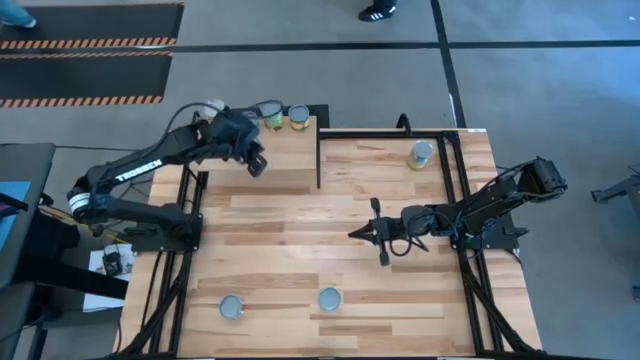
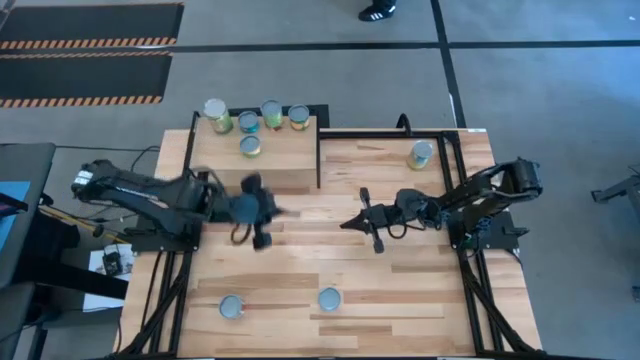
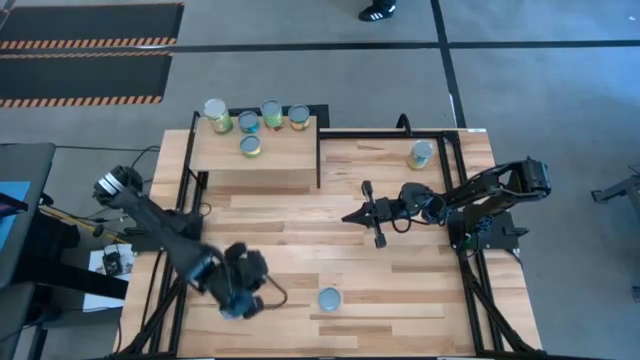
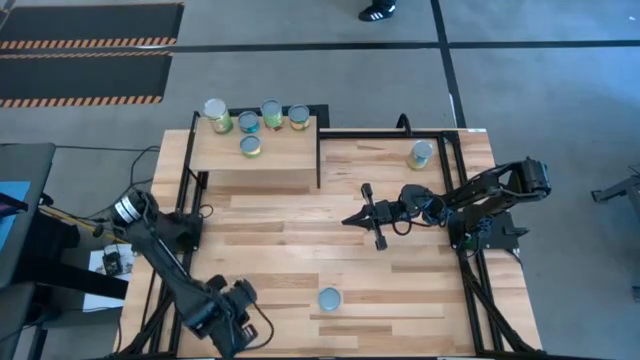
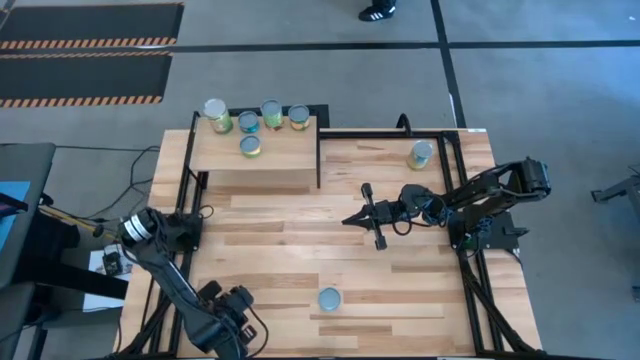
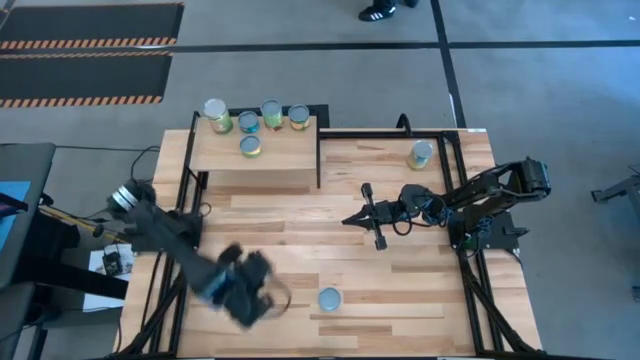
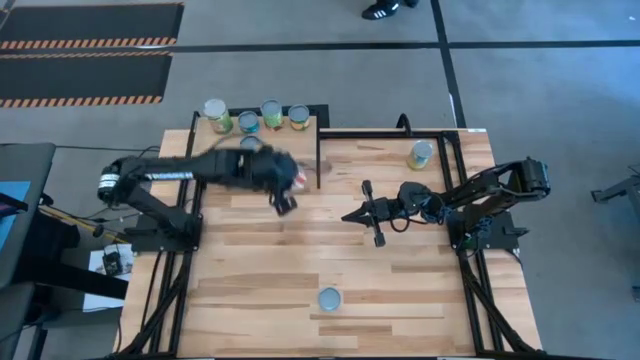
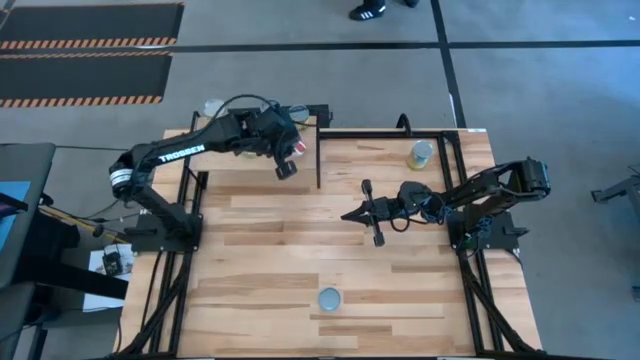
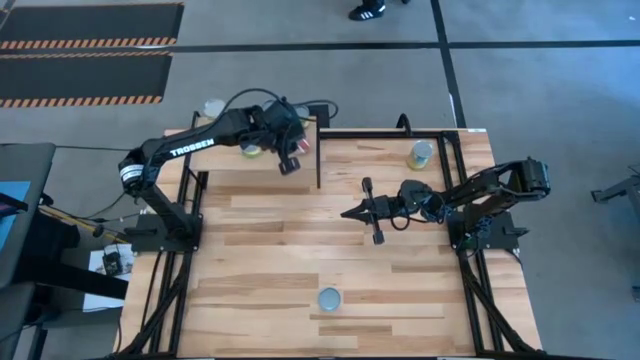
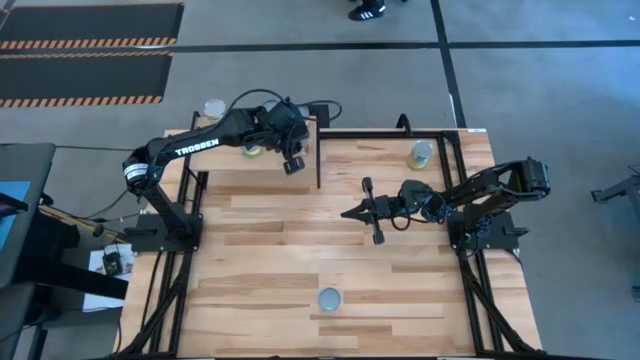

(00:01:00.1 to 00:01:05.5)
Task: Pick and place cans onto a shelf
Put the canned tomatoes on the shelf

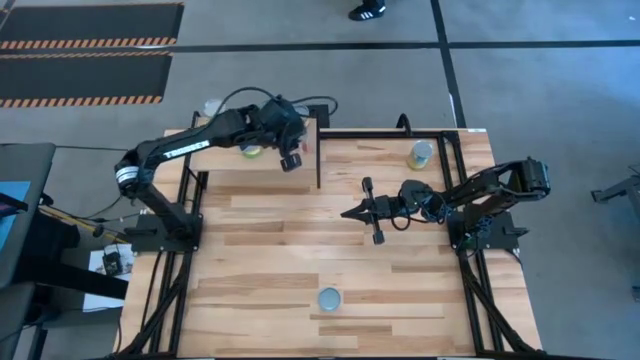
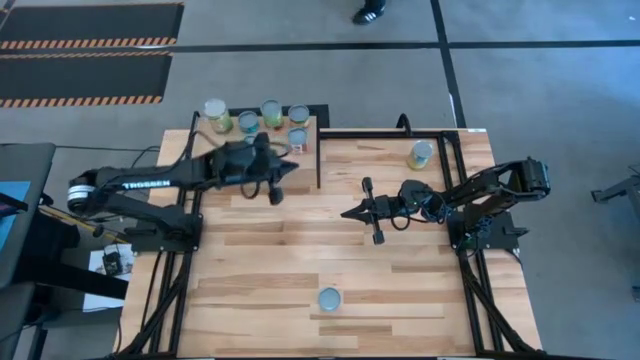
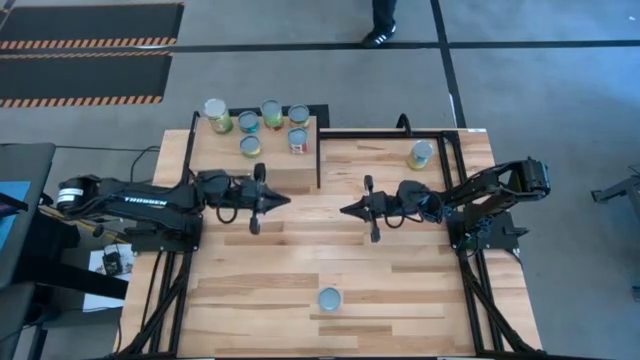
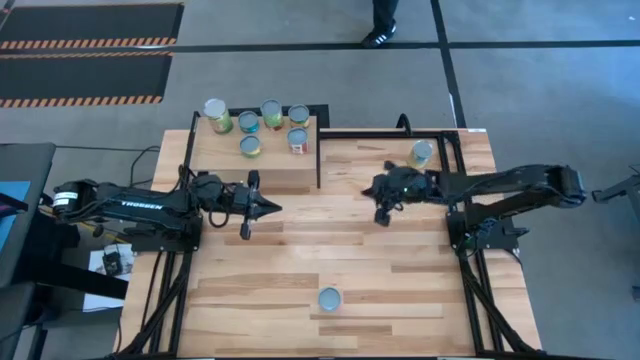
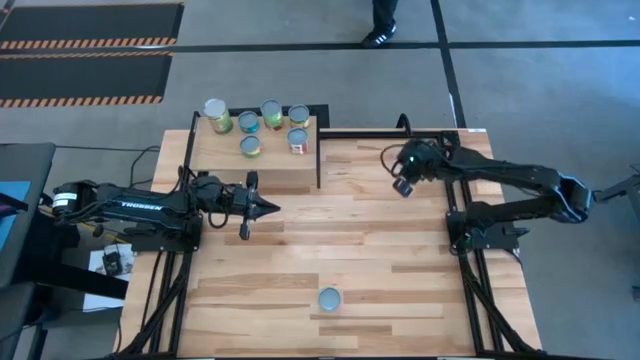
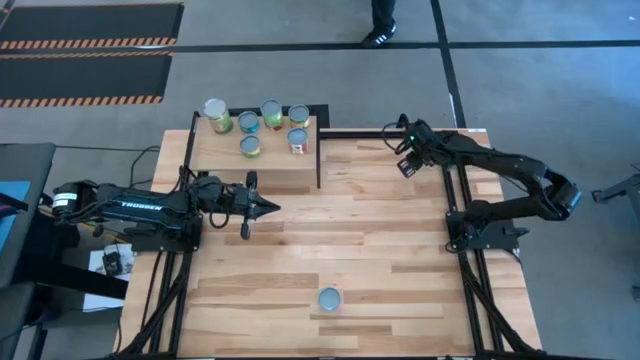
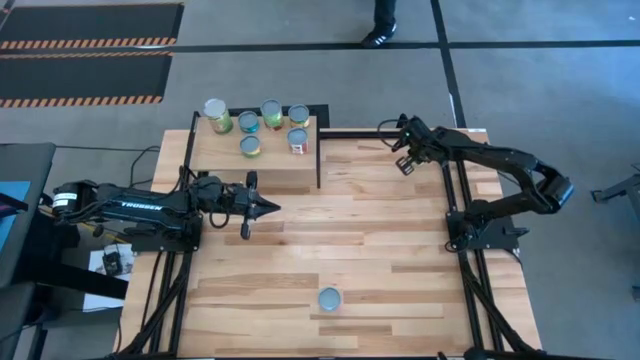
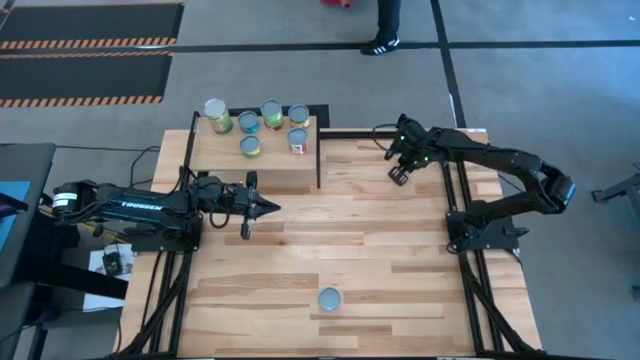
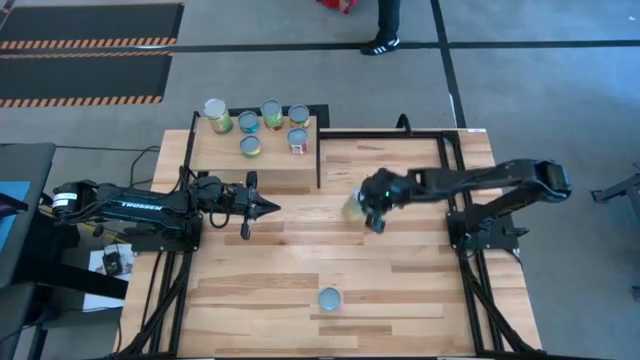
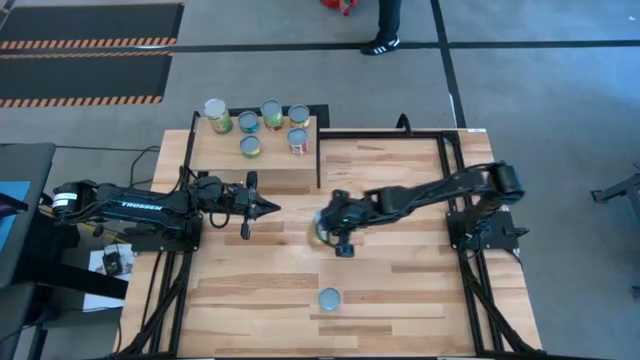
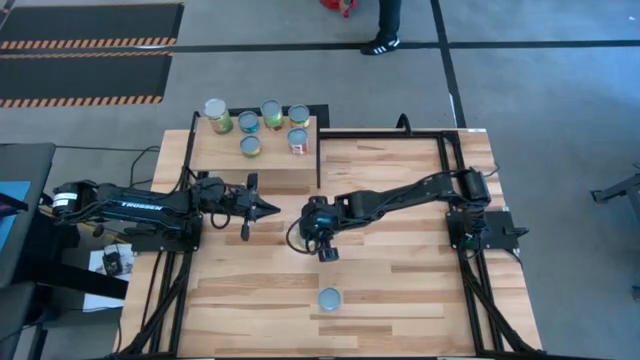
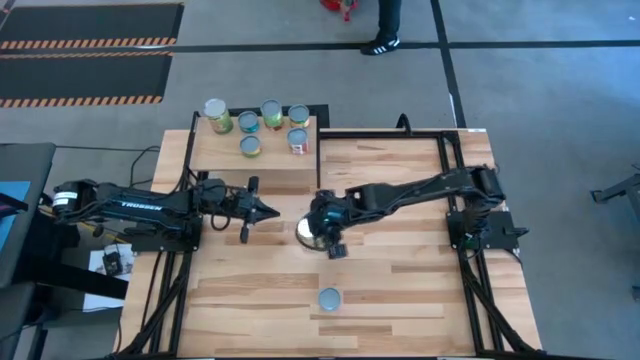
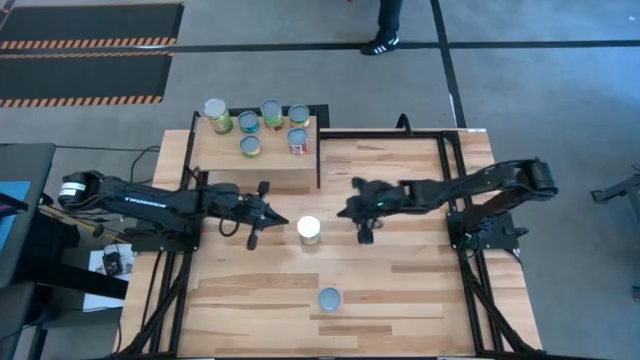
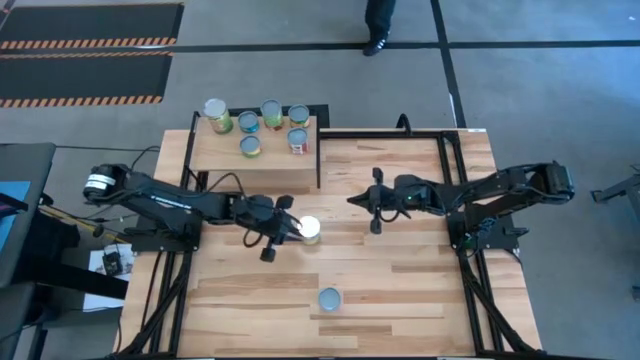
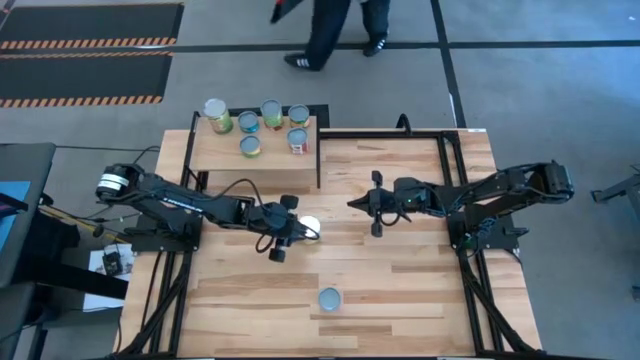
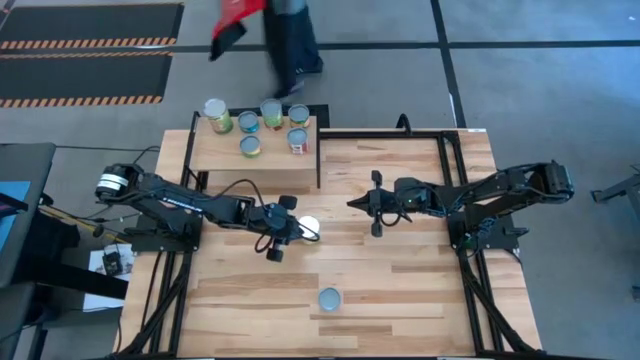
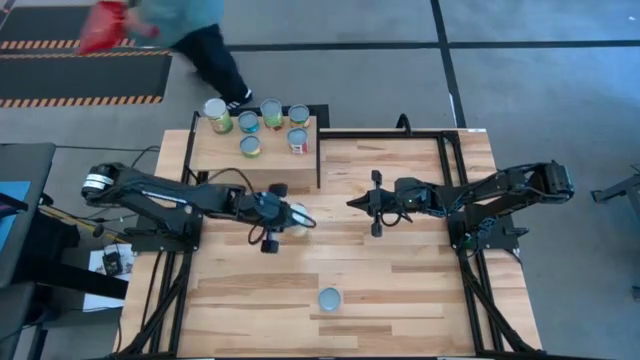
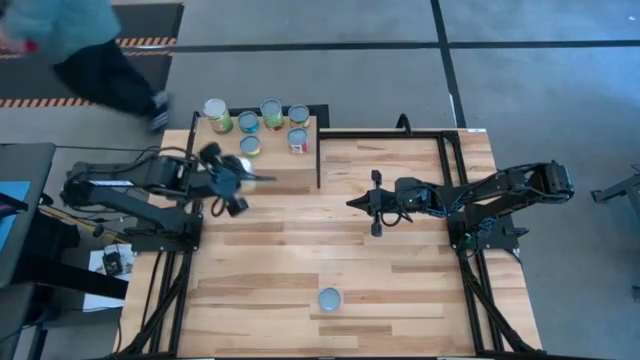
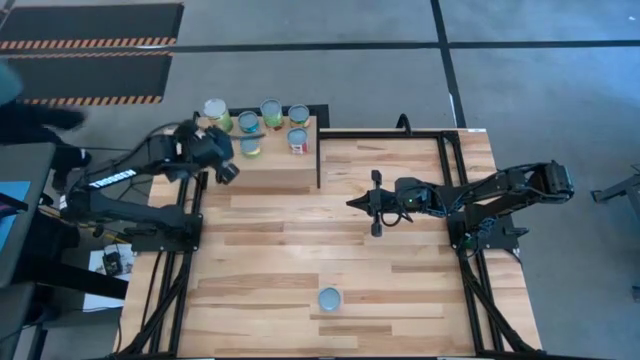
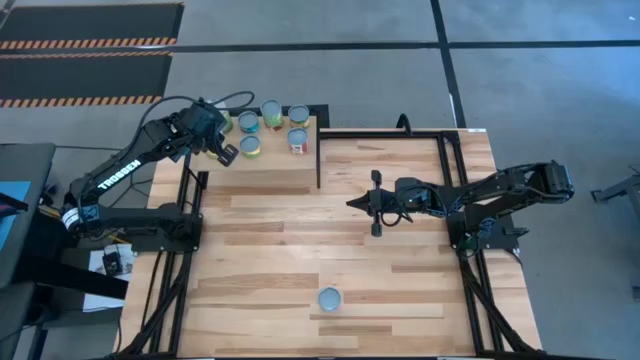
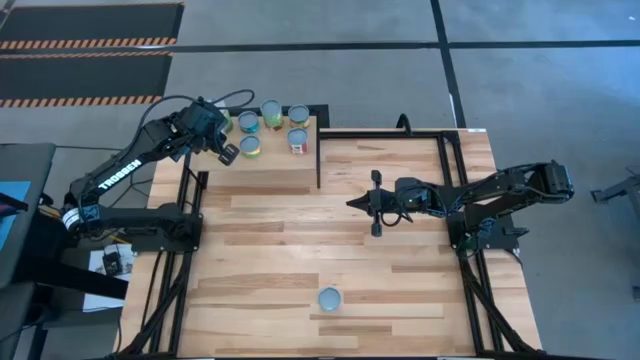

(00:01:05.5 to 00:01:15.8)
Put the canned carrots on the shelf

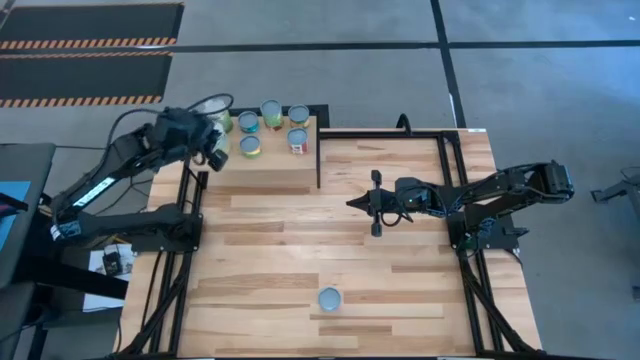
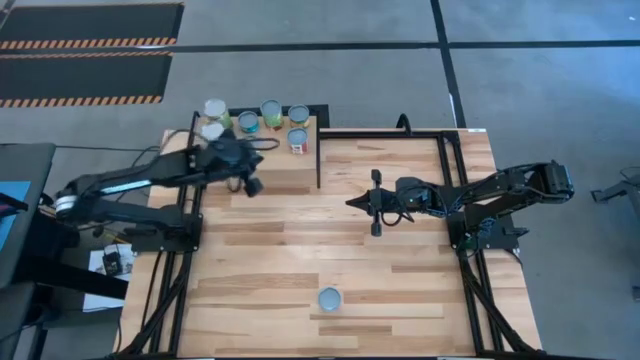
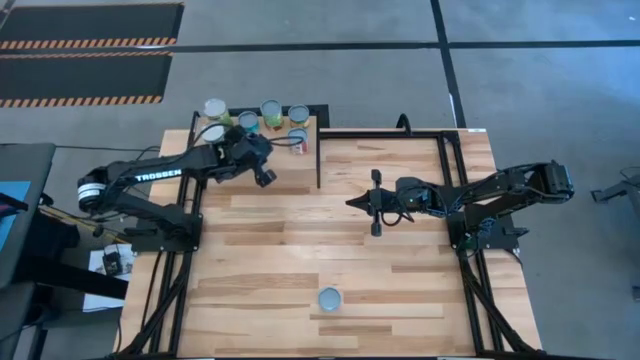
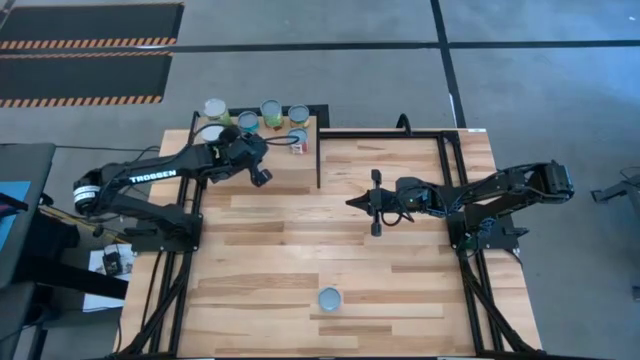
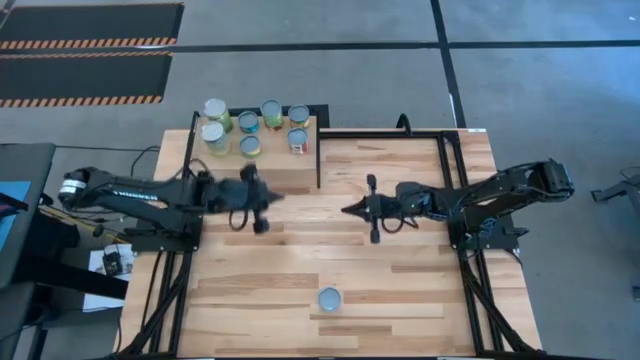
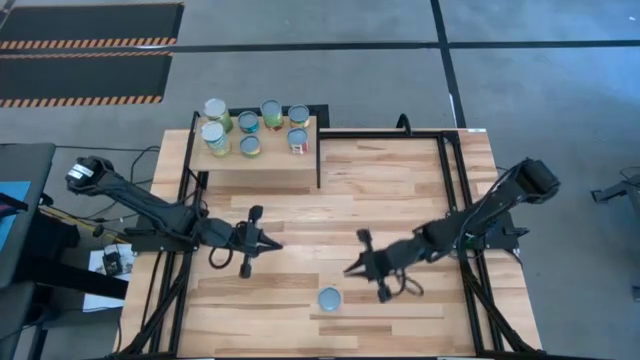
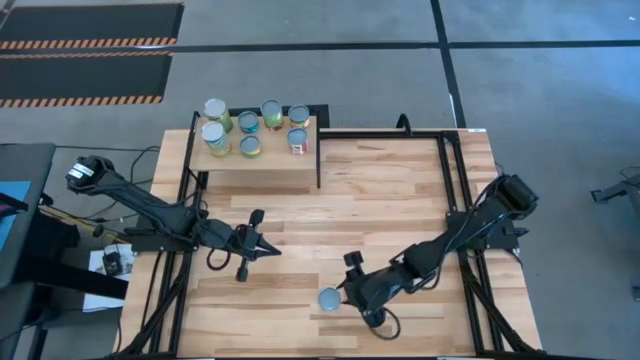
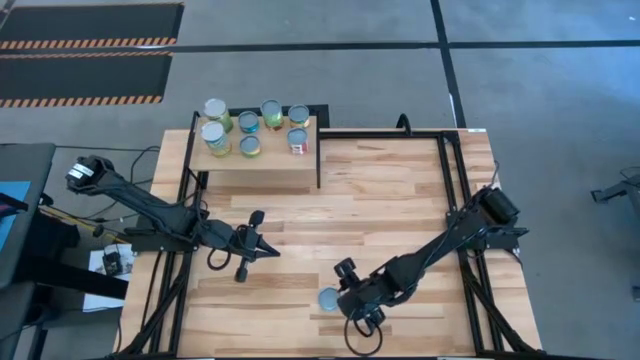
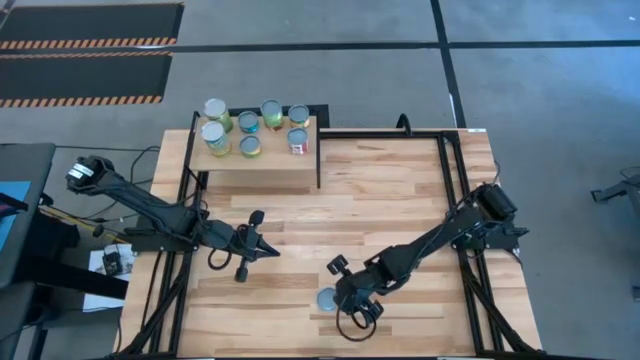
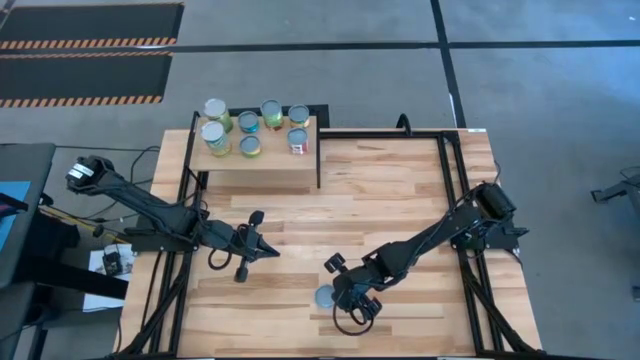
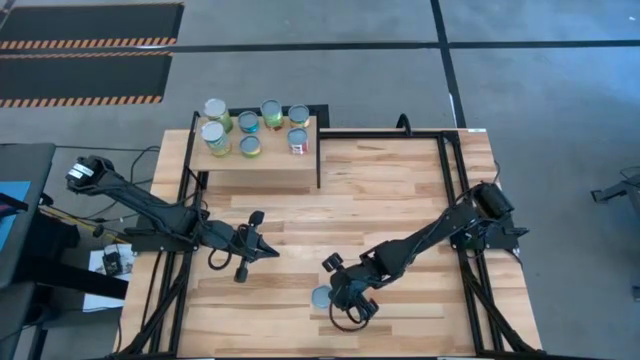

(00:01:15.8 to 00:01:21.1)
Put the canned mixed fruit on the shelf
